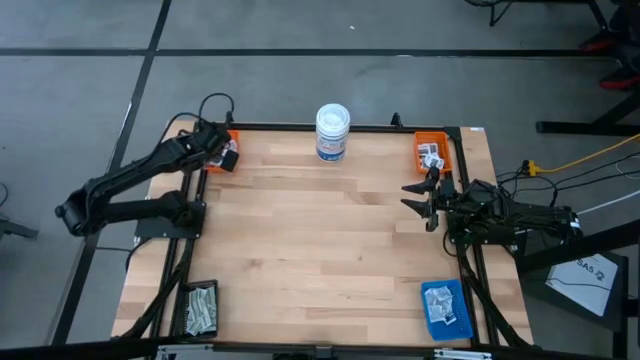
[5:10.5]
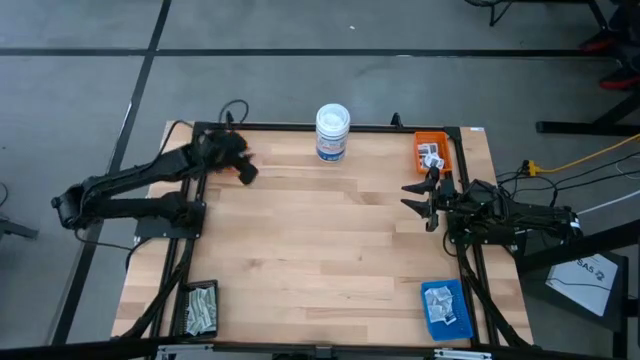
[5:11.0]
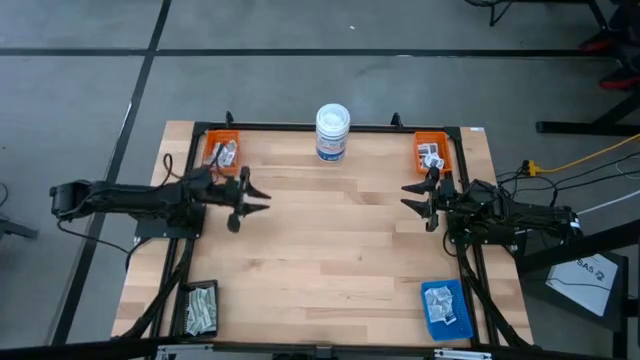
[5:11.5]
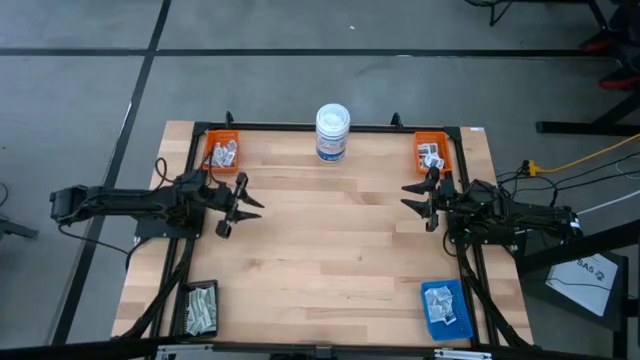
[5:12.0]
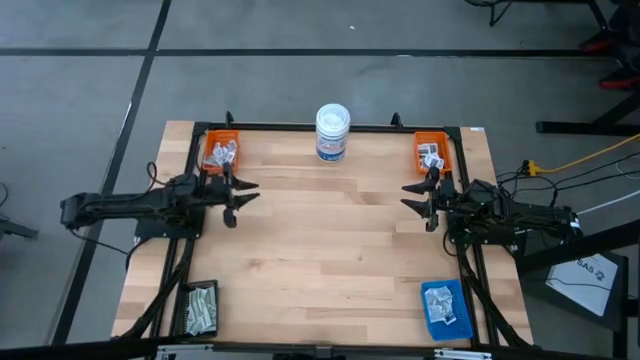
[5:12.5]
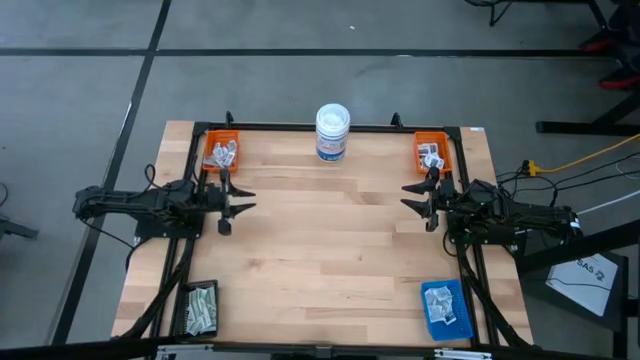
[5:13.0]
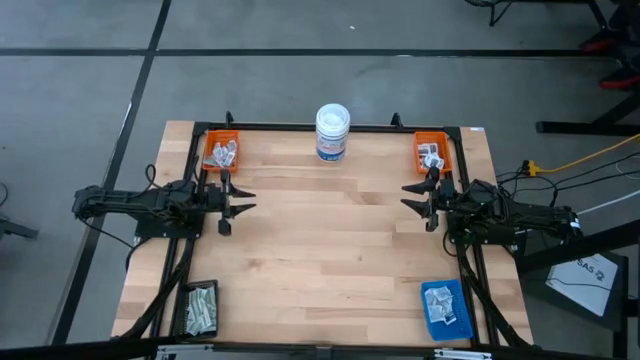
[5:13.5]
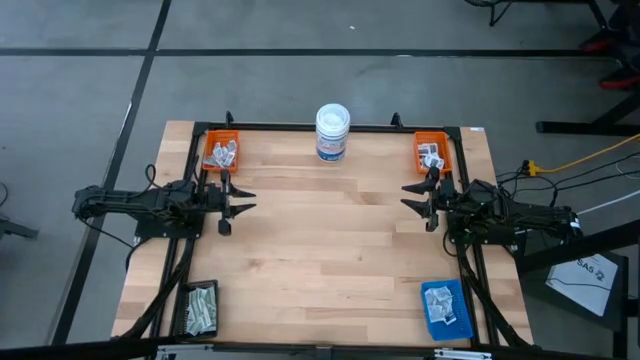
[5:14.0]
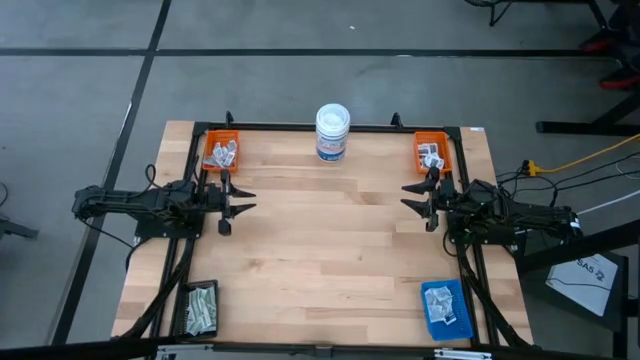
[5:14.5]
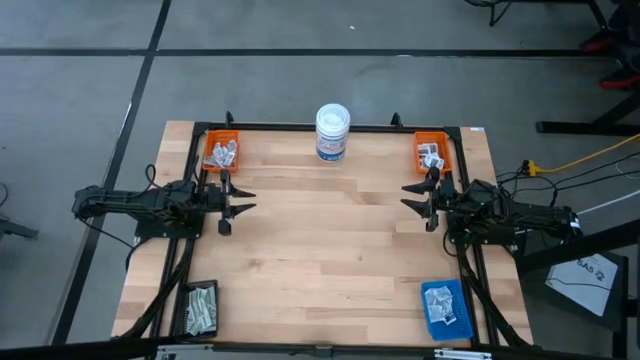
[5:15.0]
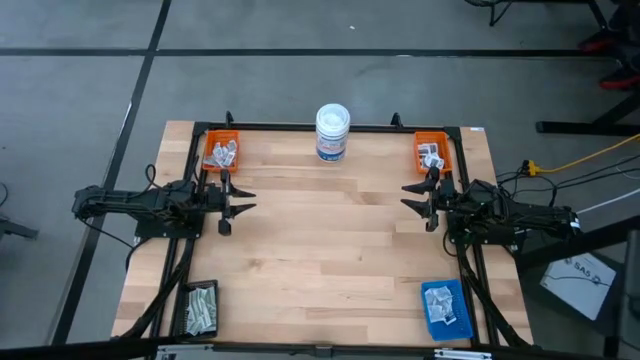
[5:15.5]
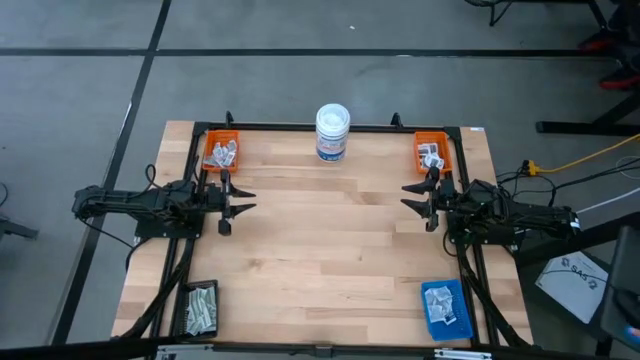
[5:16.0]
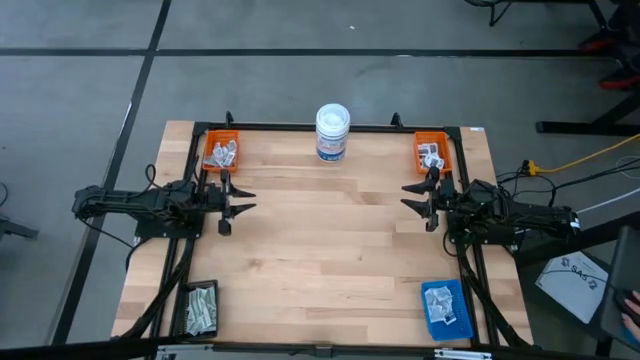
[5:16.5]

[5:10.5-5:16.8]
Task: Pick & Place First Aid Supplies
Return to Home Position

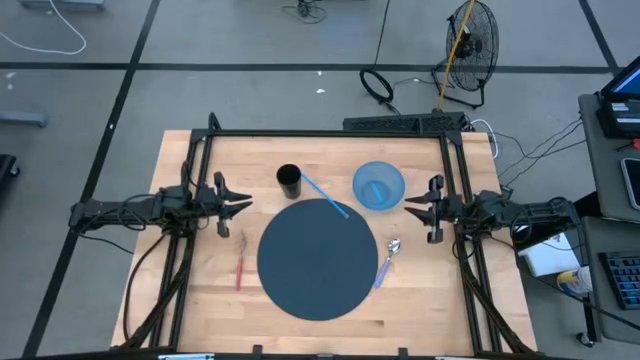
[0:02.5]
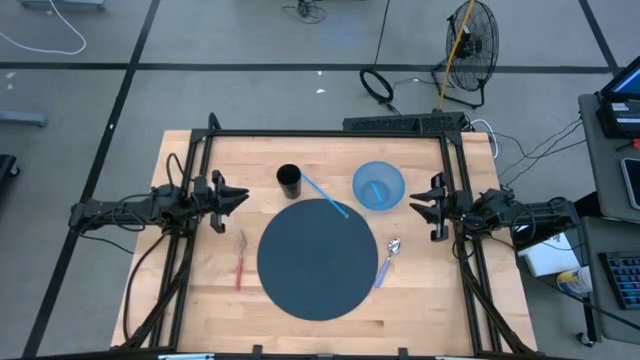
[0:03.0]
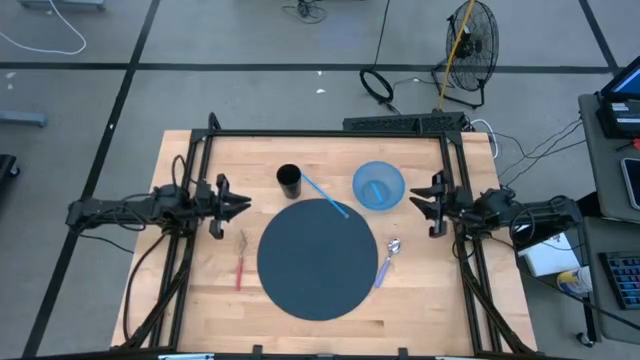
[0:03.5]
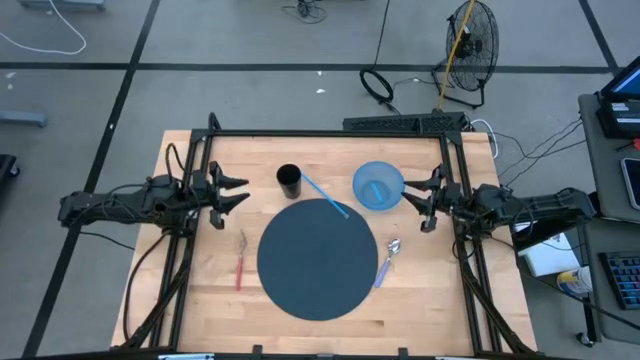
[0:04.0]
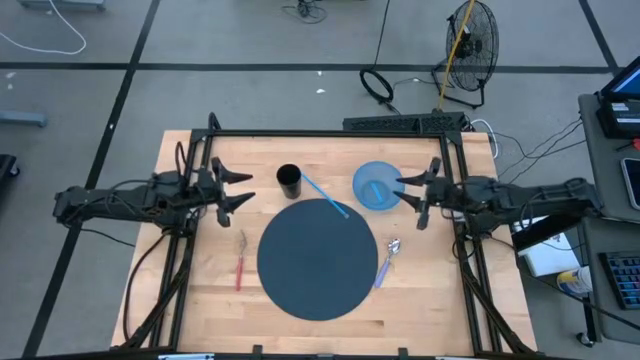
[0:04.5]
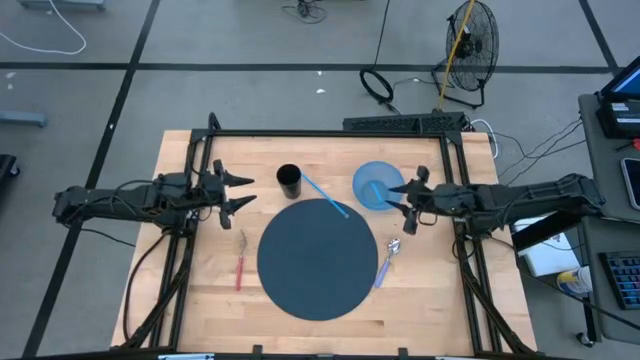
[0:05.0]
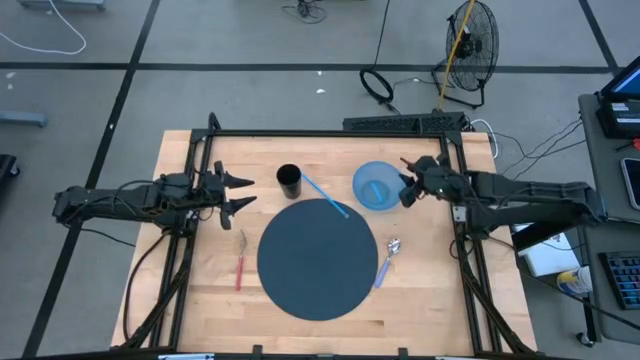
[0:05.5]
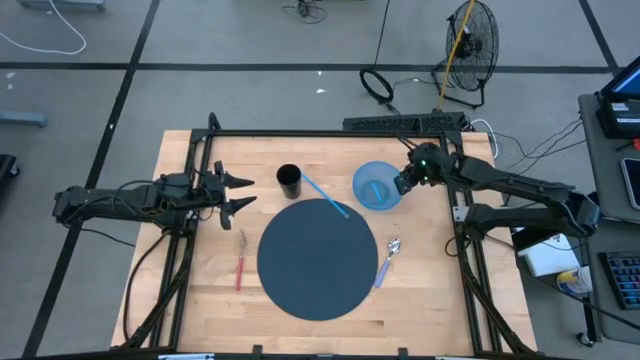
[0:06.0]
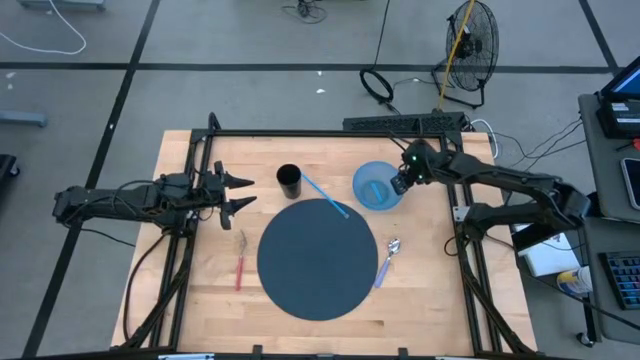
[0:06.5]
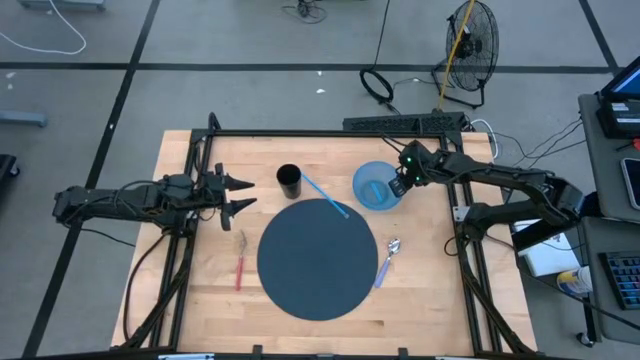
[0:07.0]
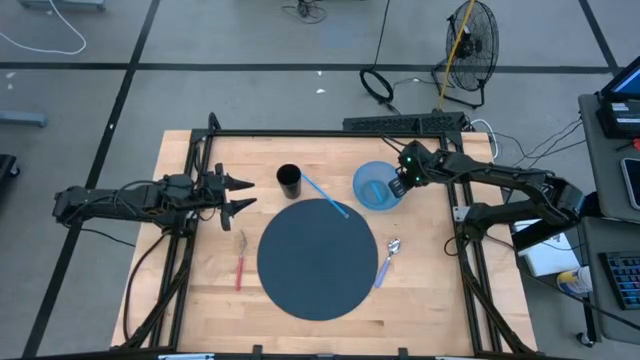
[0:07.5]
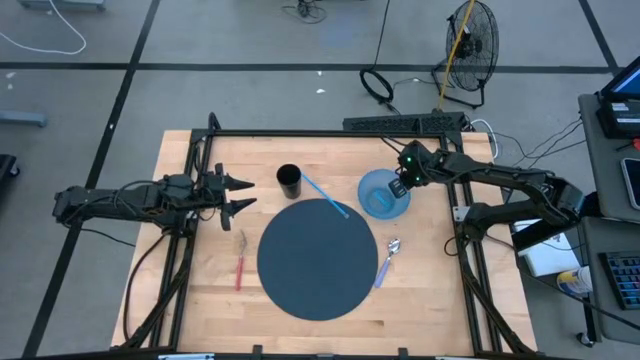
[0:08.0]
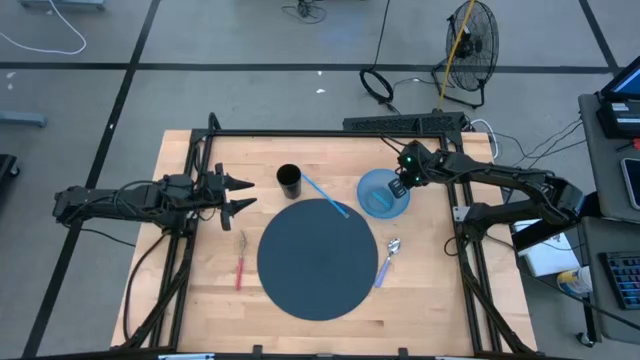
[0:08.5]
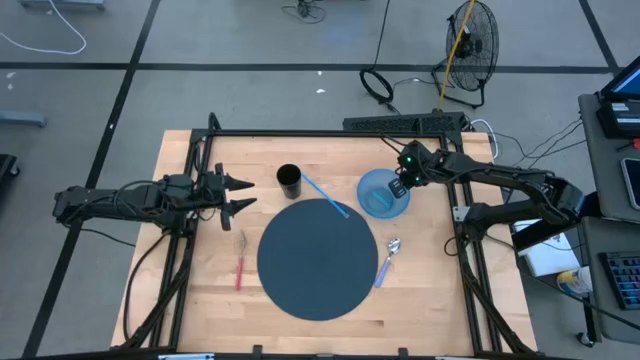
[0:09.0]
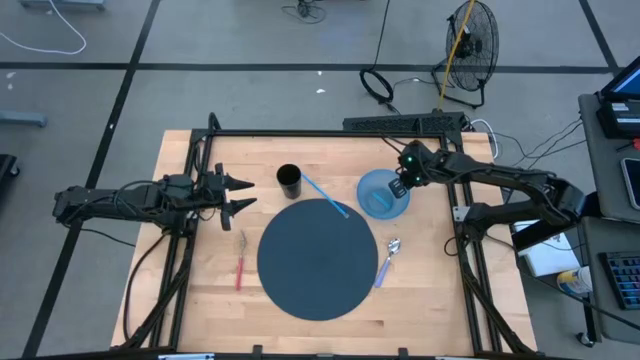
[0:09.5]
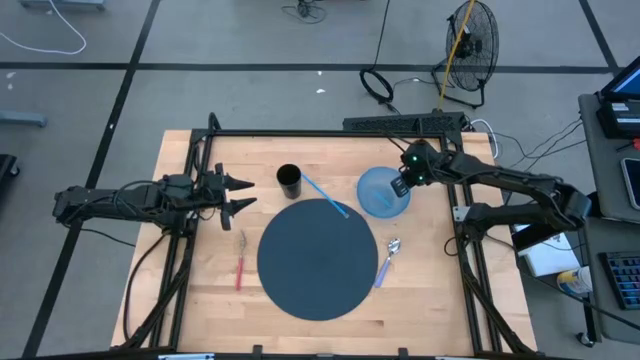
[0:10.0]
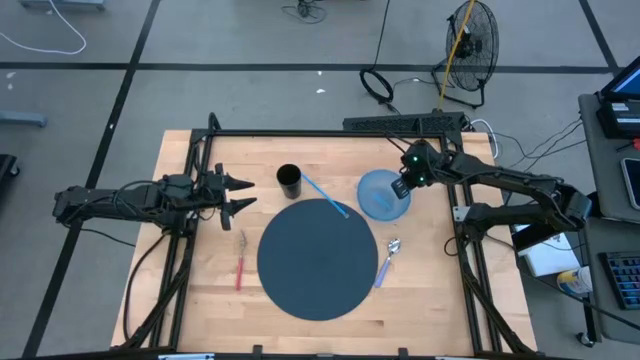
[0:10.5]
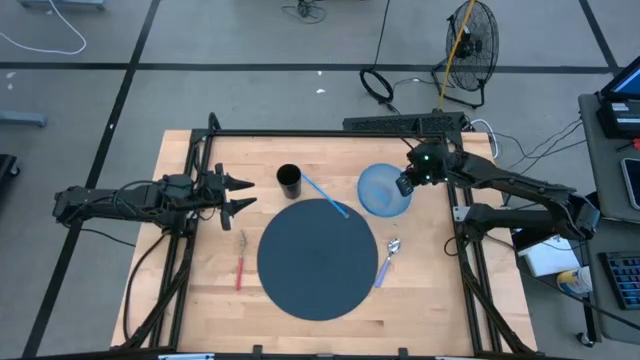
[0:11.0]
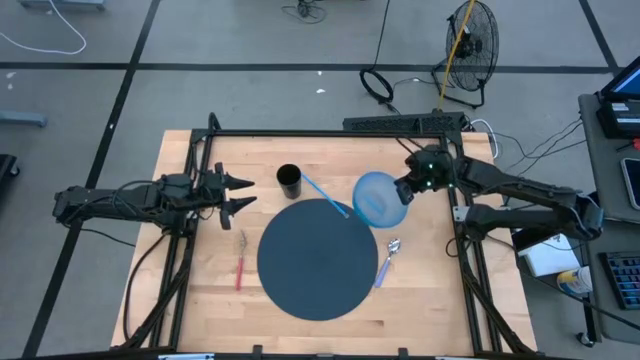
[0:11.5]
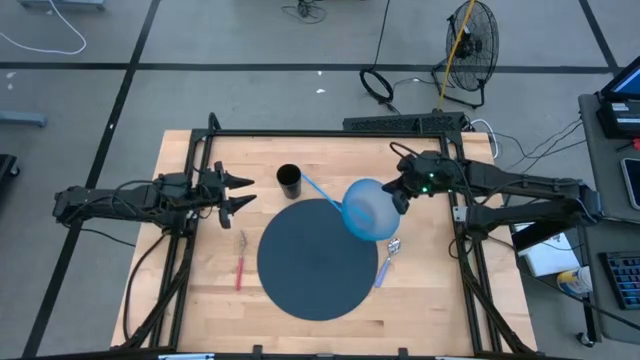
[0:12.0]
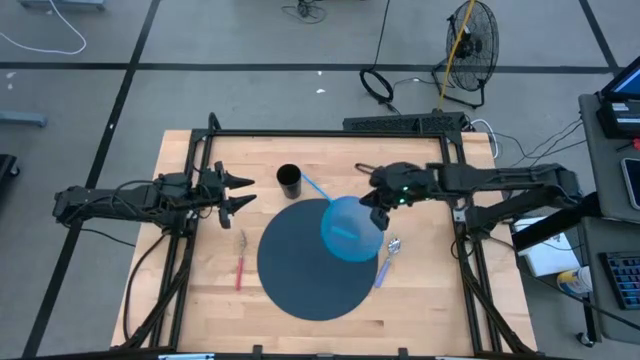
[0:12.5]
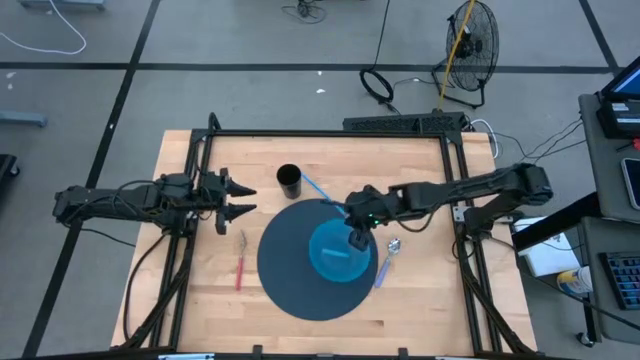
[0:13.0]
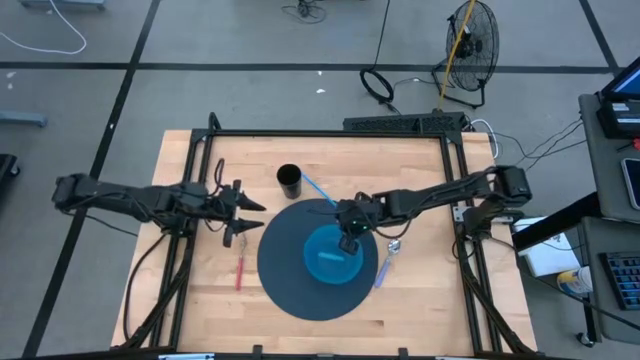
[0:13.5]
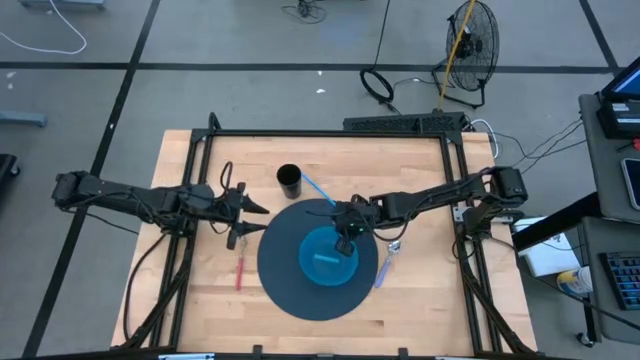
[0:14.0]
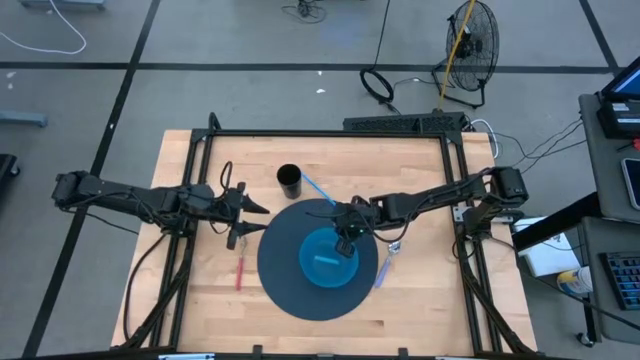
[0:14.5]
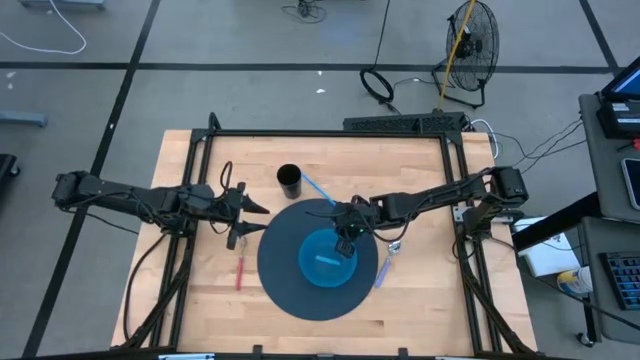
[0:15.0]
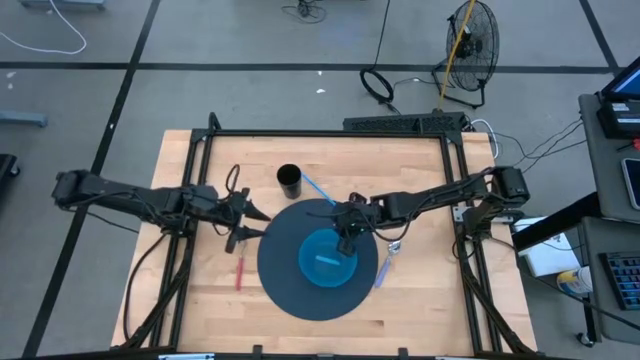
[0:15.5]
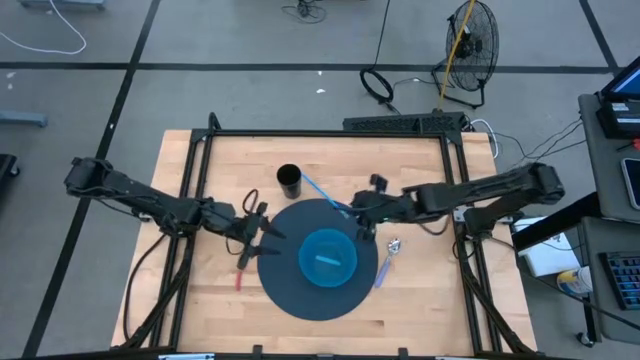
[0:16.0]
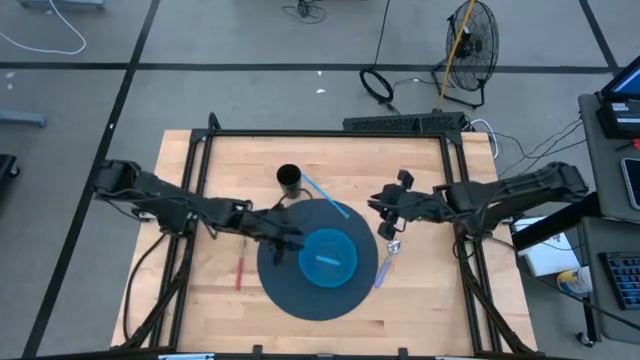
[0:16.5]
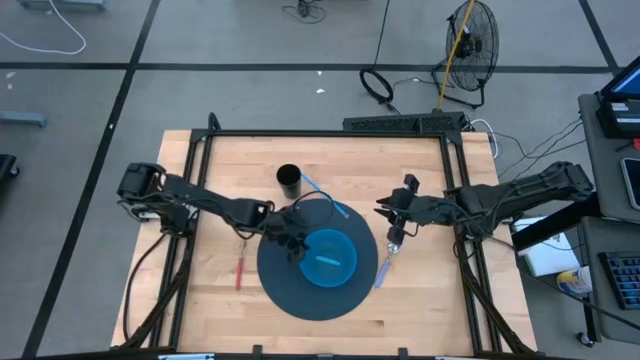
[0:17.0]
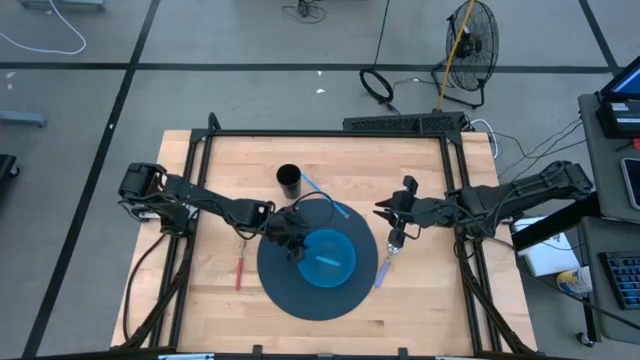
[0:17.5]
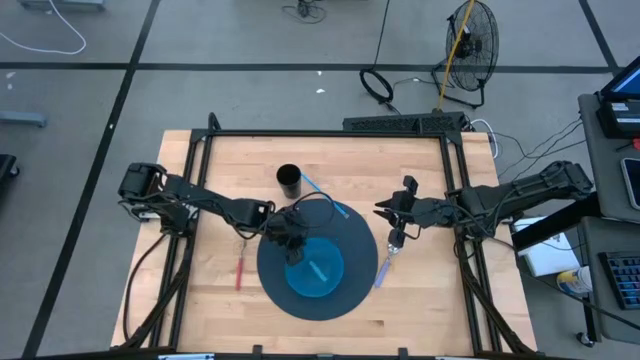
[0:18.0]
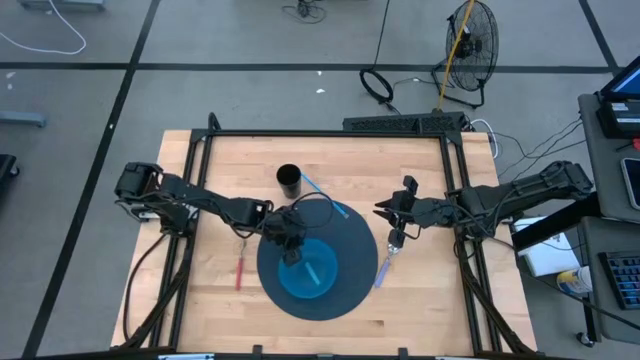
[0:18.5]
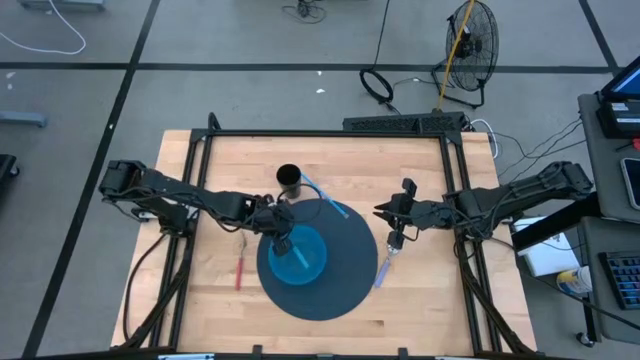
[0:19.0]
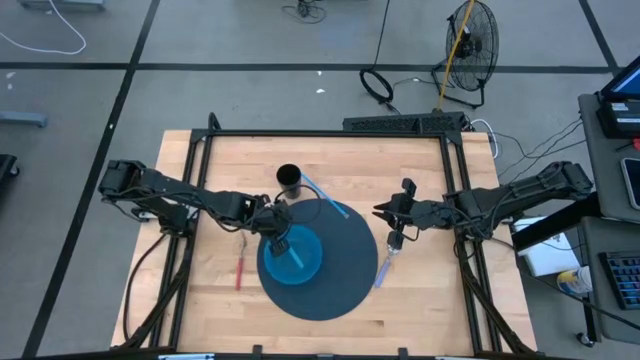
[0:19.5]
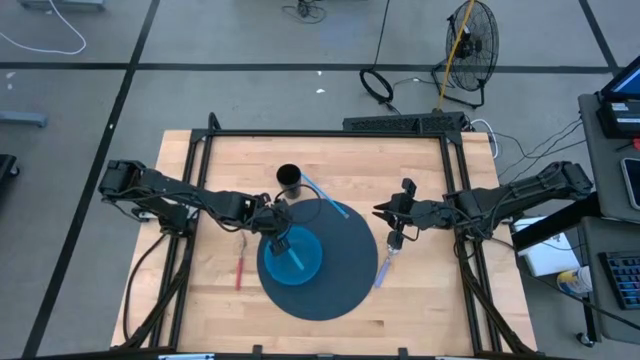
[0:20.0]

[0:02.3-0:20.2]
Task: Pick & Place Utensil
Put the blue bowl on the blue mat
